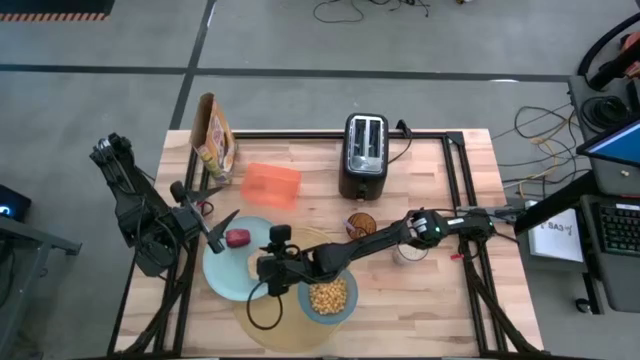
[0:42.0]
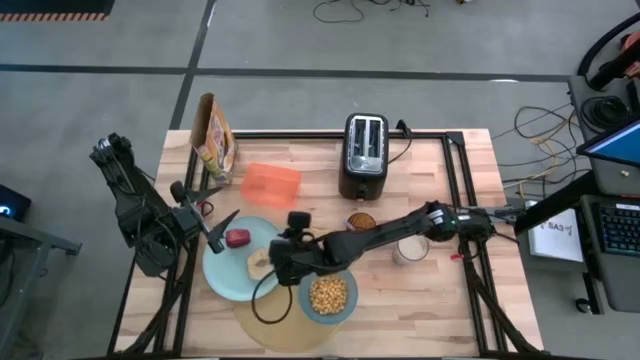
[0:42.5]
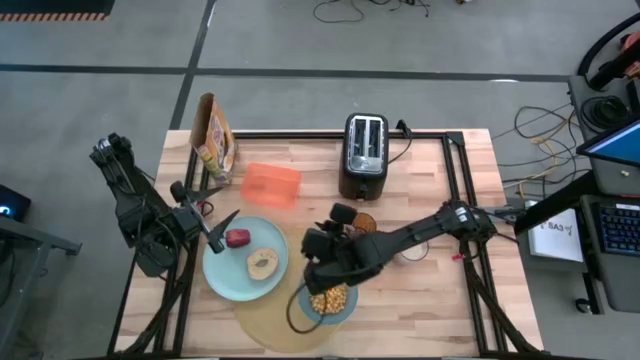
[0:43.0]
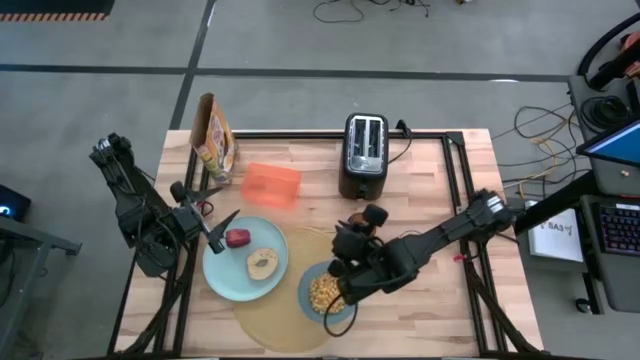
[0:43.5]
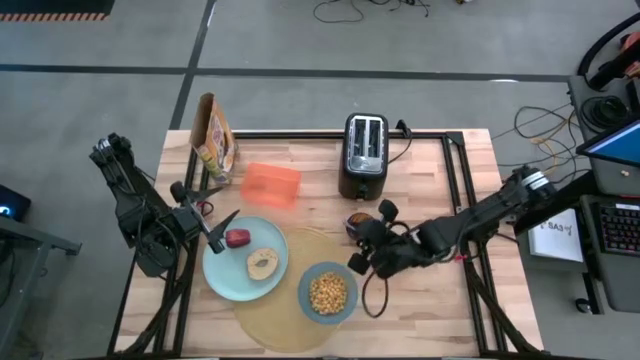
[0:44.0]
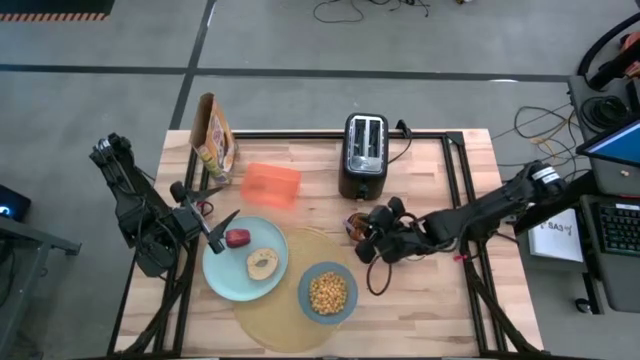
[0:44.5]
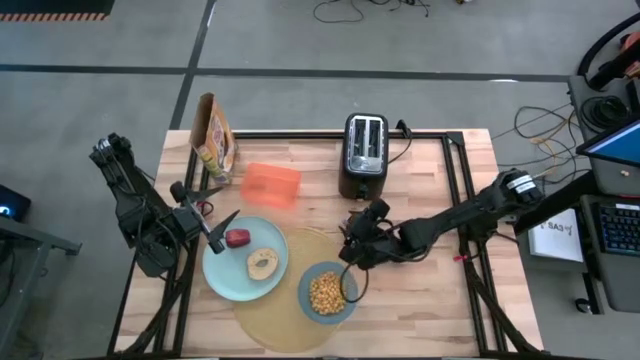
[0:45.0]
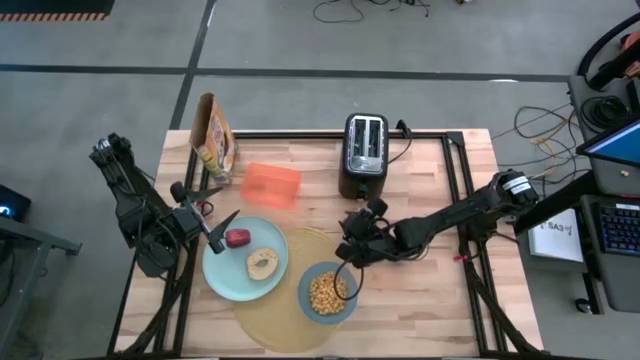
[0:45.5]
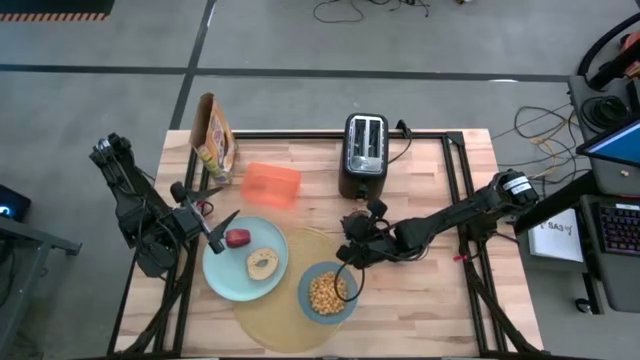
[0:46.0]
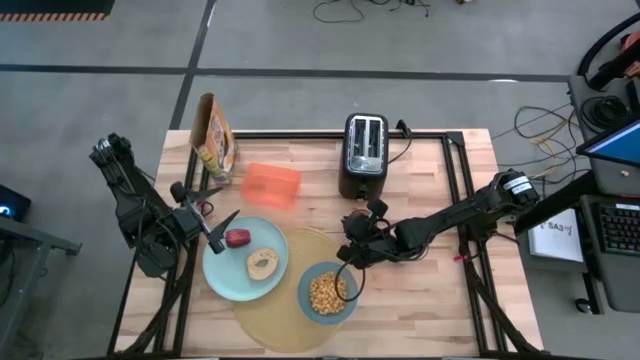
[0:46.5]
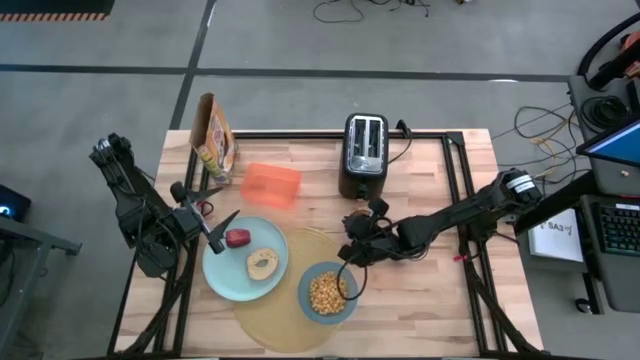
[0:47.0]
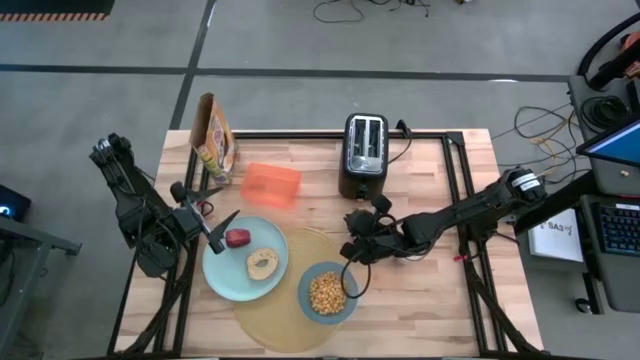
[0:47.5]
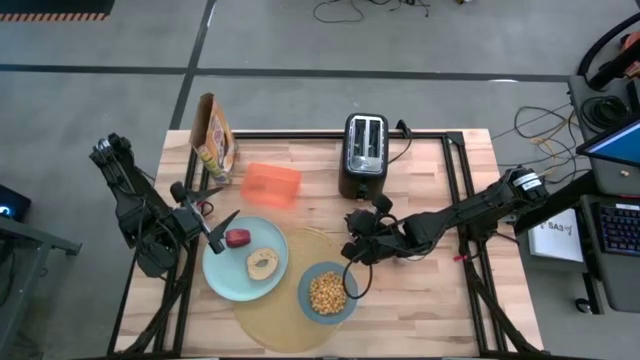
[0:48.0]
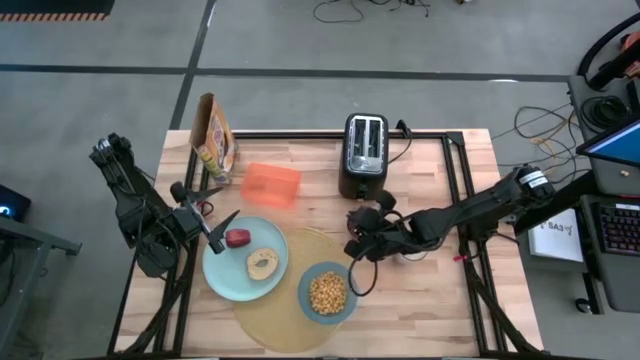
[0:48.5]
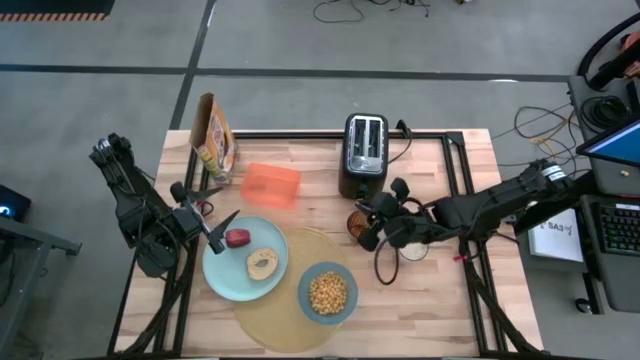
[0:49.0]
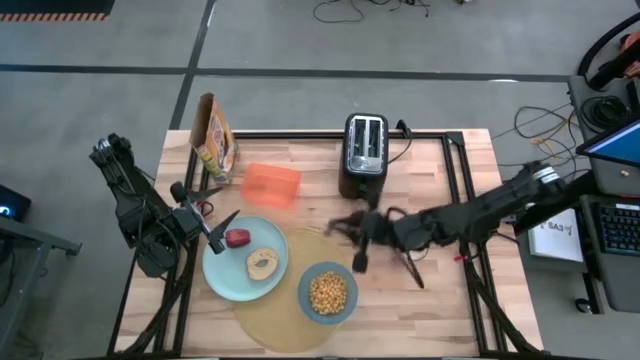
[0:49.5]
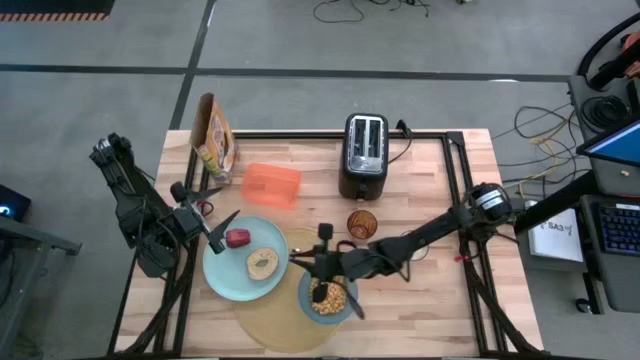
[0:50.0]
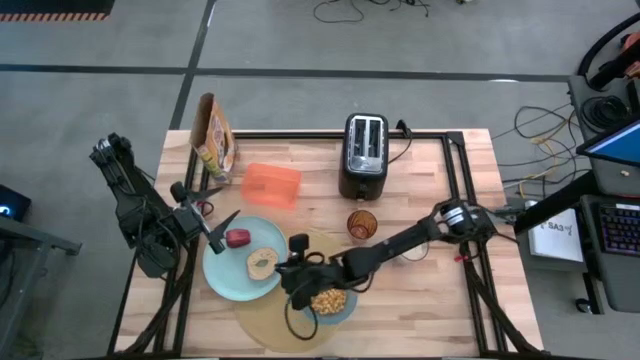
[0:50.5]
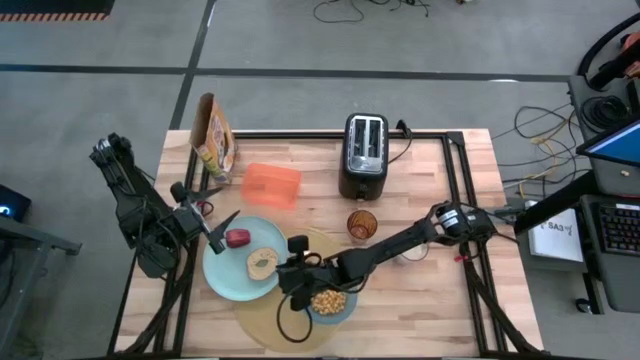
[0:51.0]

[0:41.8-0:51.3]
Task: Arrange a breakfast setting
Put the blue spoon on the placemat

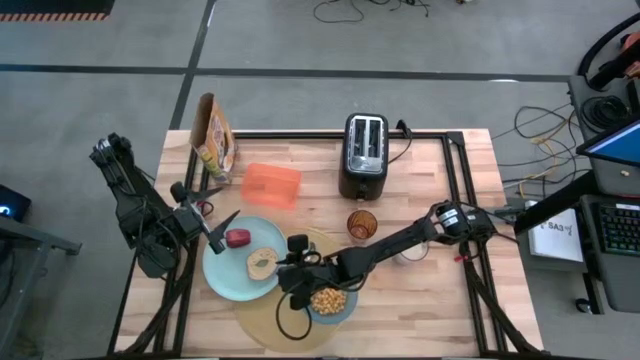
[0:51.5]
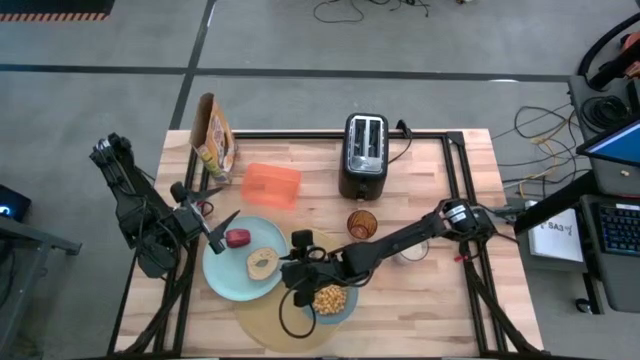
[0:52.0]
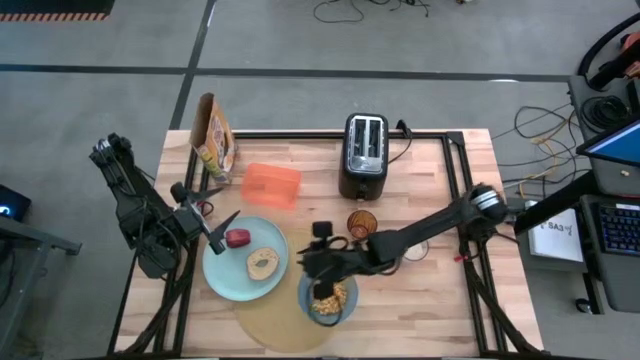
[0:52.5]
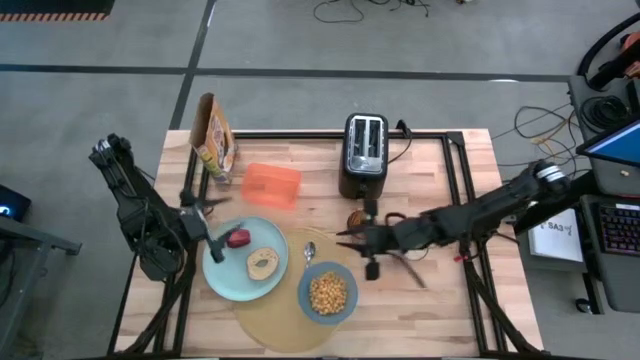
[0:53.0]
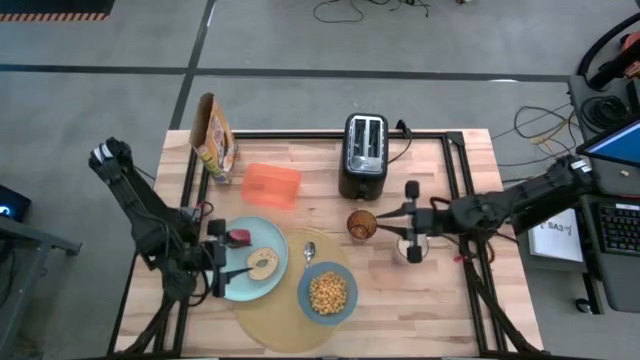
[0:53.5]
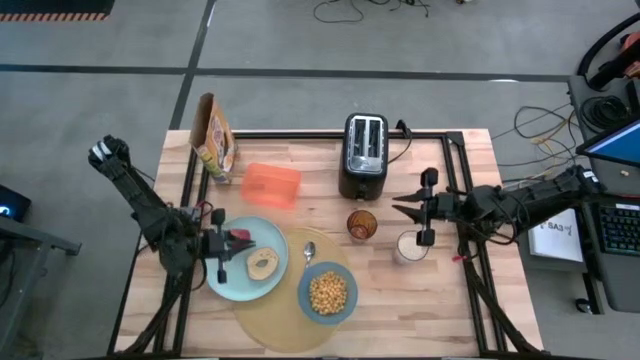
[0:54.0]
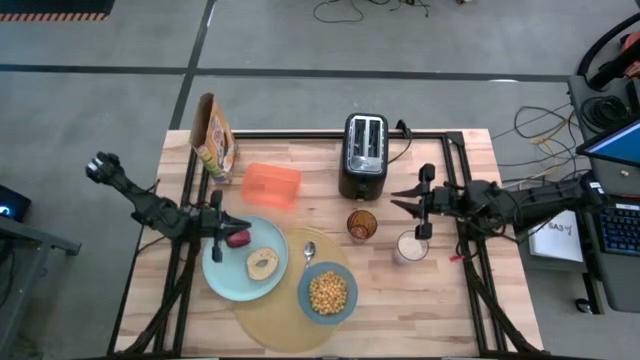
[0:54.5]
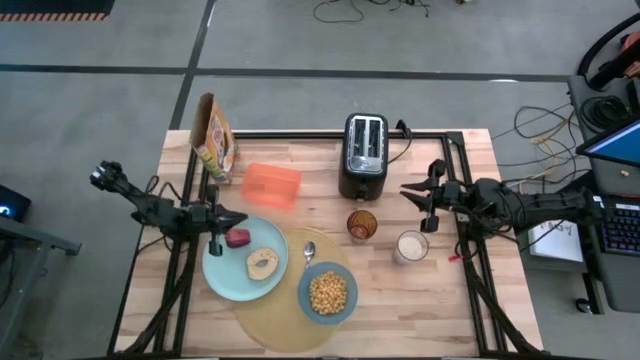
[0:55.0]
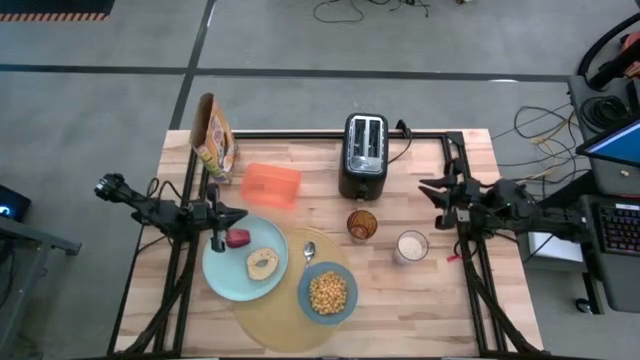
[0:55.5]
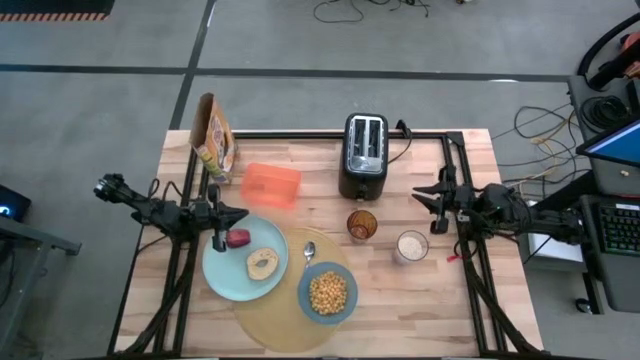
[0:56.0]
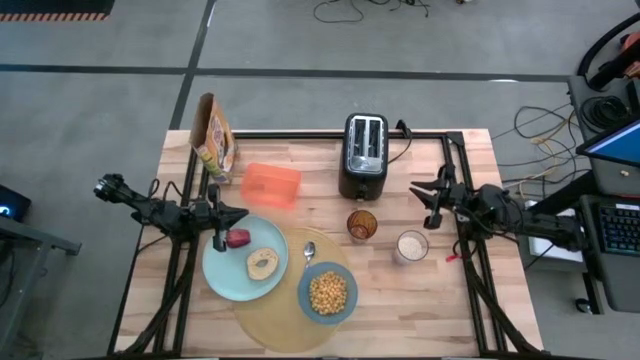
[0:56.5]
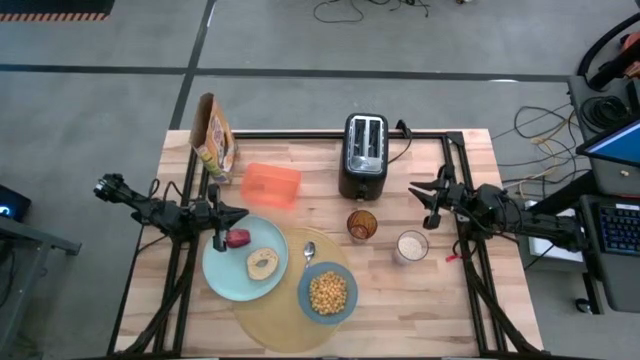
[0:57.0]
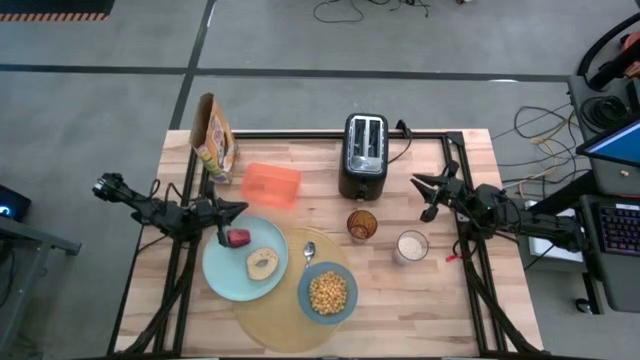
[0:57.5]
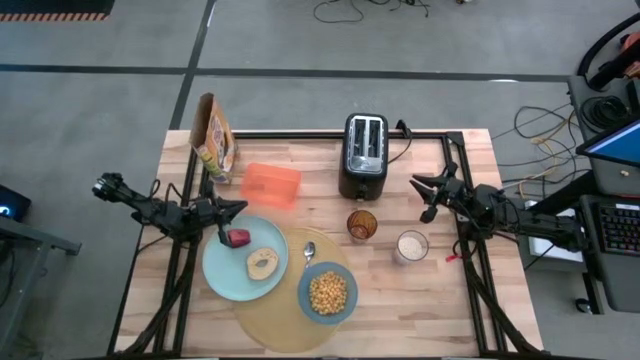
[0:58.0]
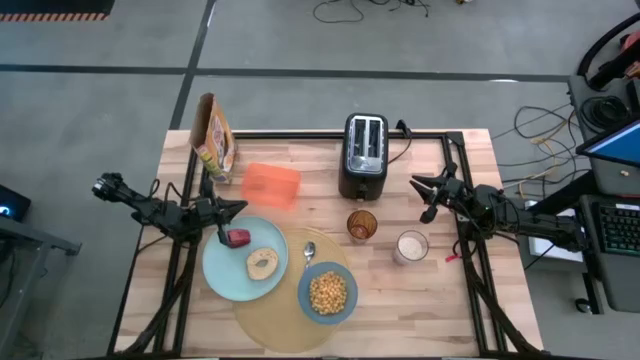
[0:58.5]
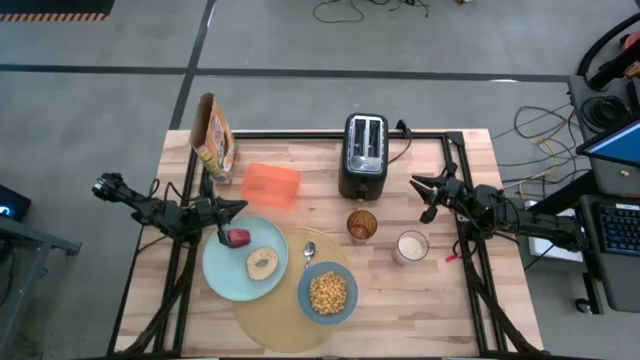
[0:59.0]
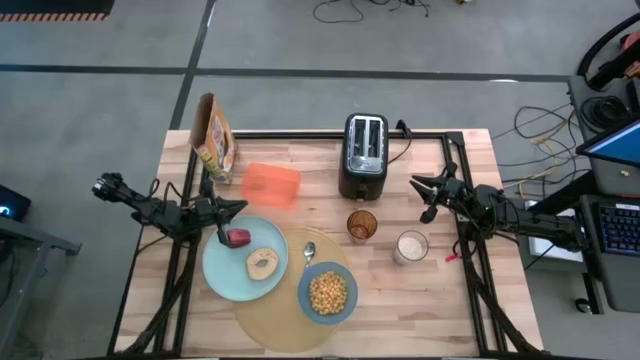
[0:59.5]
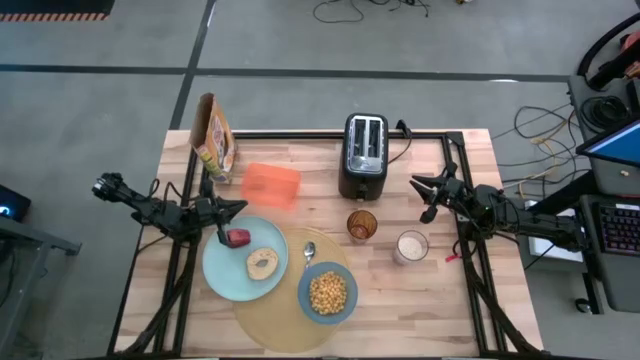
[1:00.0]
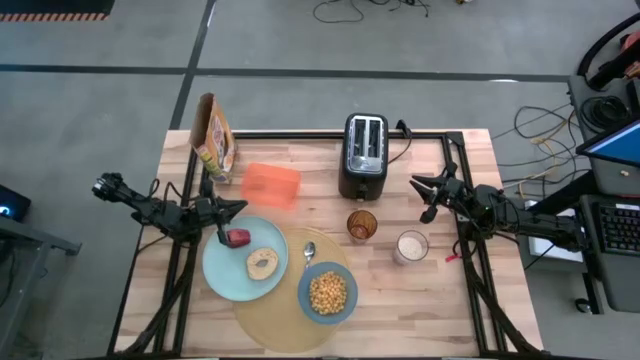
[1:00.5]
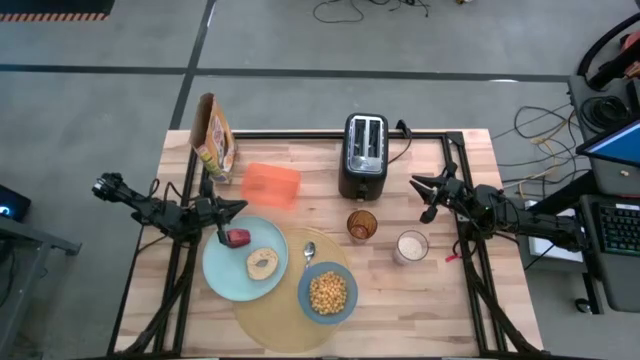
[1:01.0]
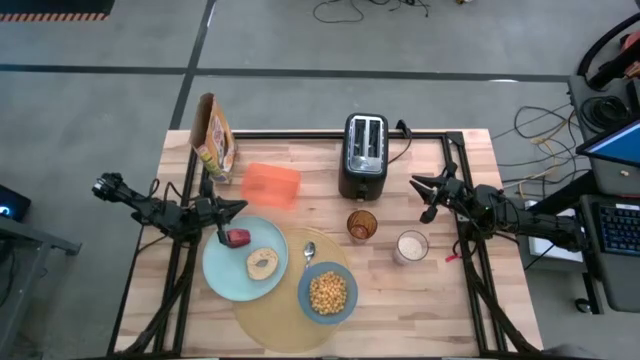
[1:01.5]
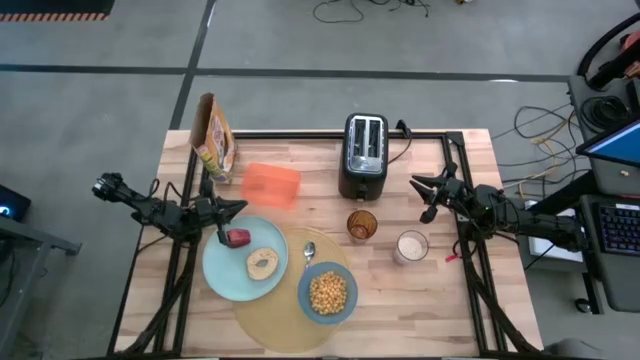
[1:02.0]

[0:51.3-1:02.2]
Return to Home Position

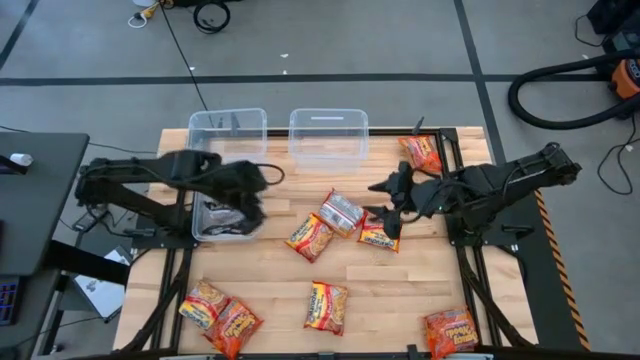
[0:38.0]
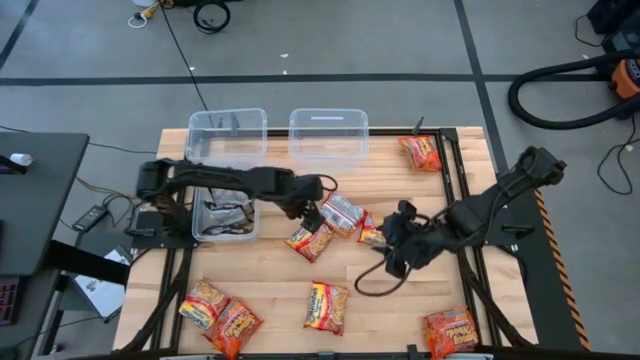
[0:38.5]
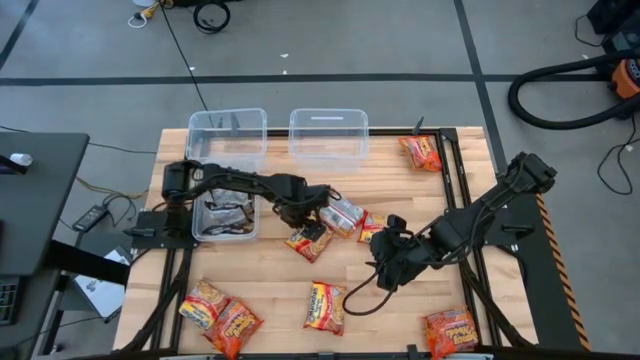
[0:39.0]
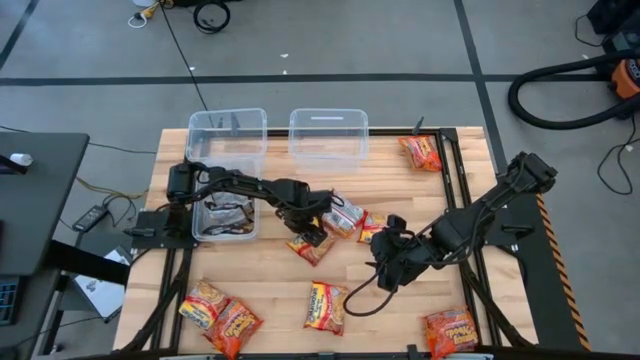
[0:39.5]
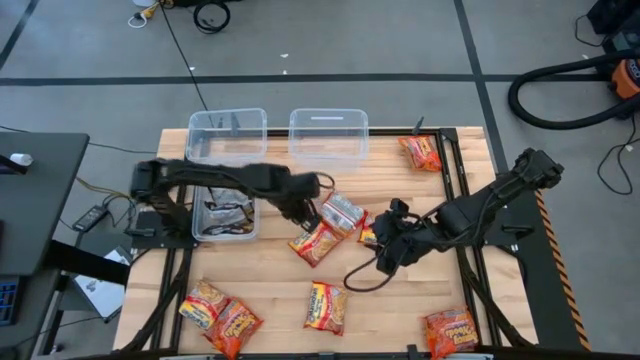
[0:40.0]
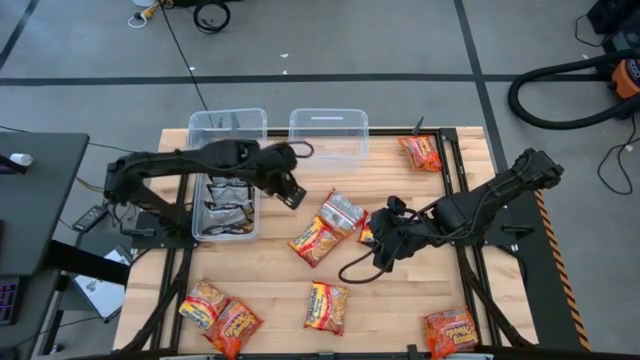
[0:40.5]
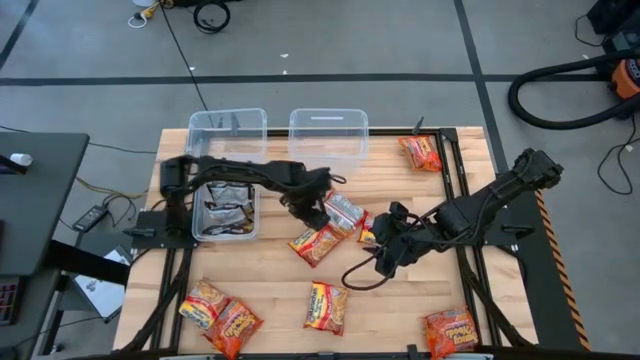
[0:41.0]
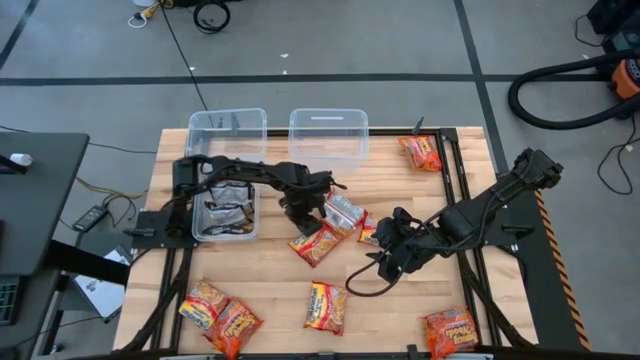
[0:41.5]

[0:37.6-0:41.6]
Task: Sort Maruchan noodles
Put the top left red noodle pack into the top left transparent bin
